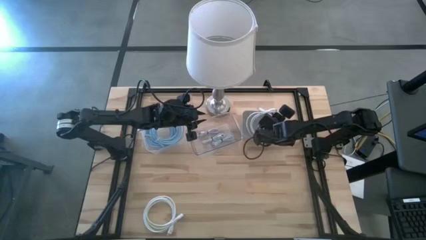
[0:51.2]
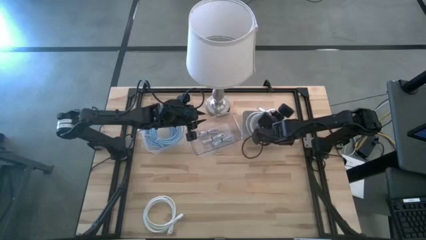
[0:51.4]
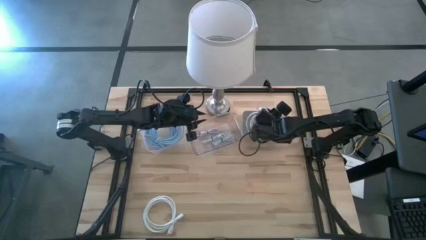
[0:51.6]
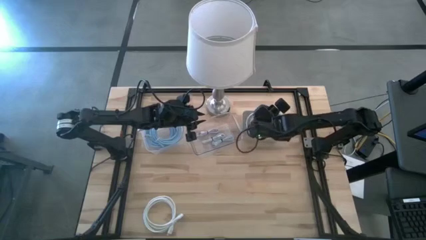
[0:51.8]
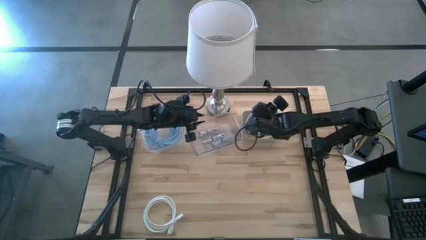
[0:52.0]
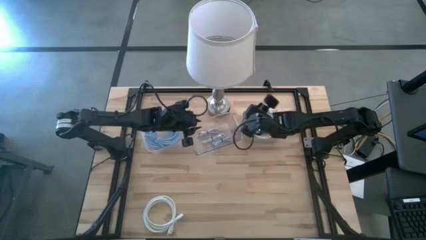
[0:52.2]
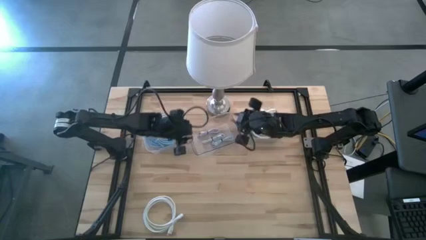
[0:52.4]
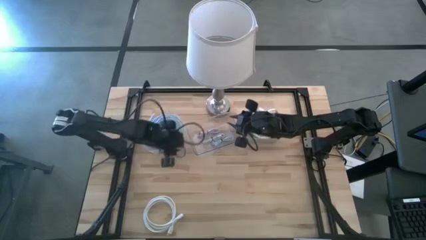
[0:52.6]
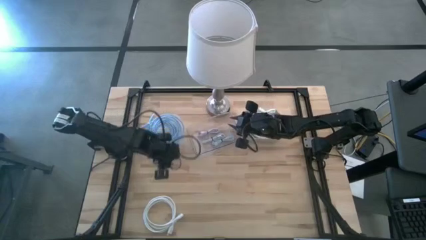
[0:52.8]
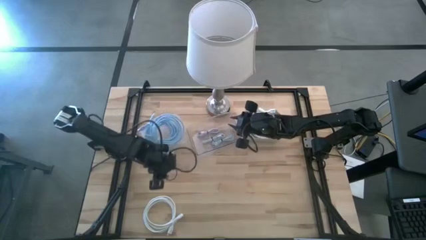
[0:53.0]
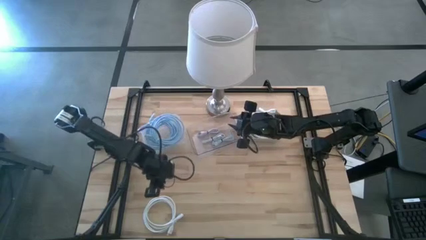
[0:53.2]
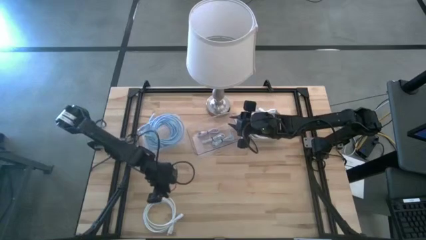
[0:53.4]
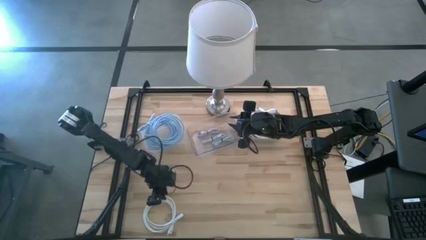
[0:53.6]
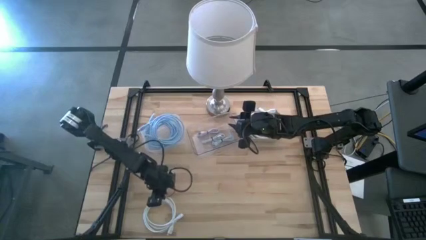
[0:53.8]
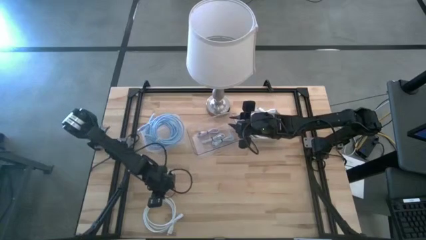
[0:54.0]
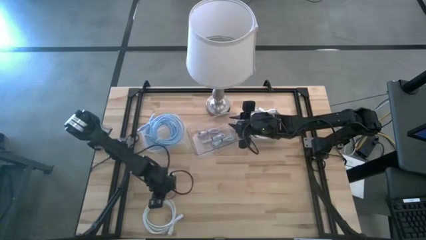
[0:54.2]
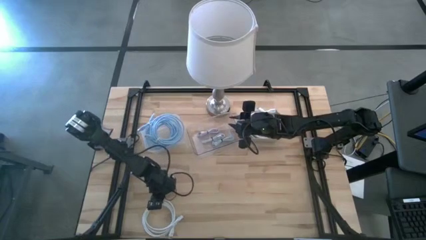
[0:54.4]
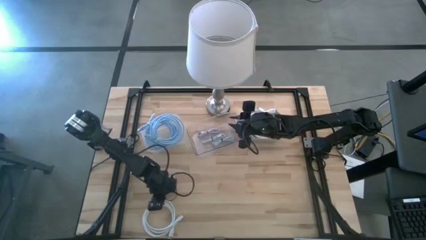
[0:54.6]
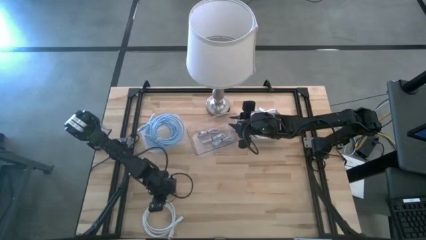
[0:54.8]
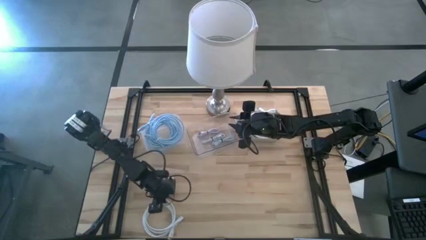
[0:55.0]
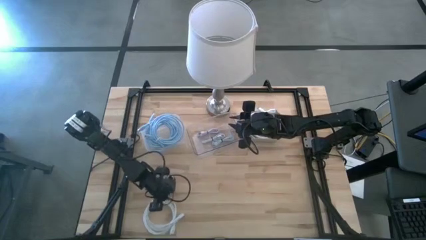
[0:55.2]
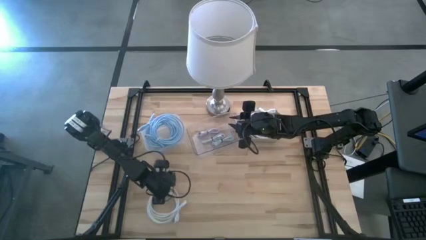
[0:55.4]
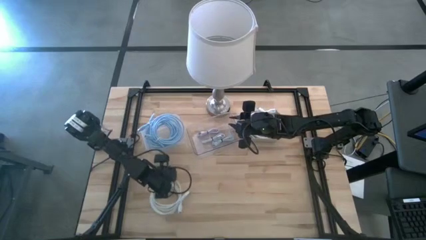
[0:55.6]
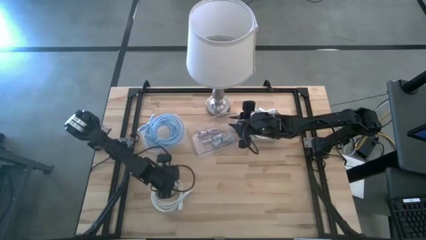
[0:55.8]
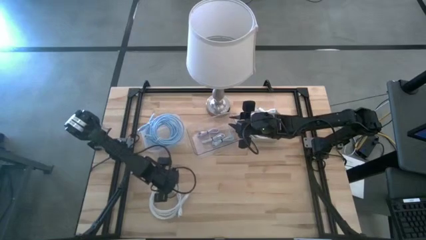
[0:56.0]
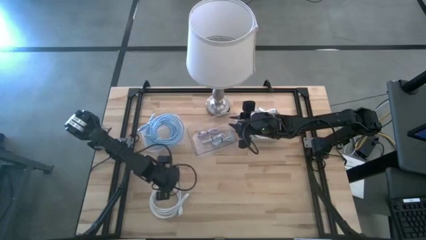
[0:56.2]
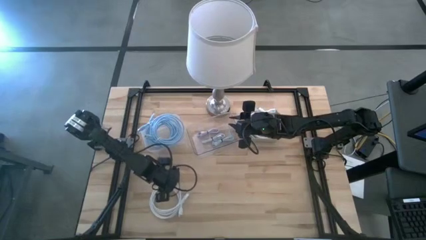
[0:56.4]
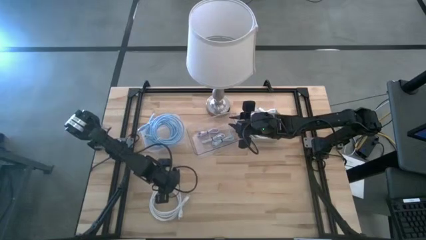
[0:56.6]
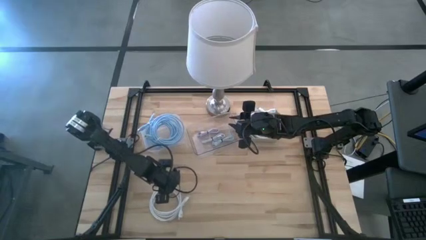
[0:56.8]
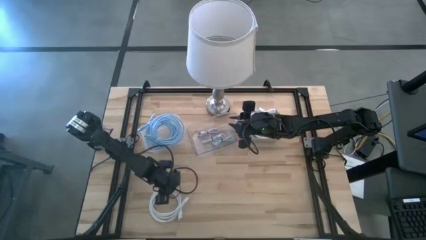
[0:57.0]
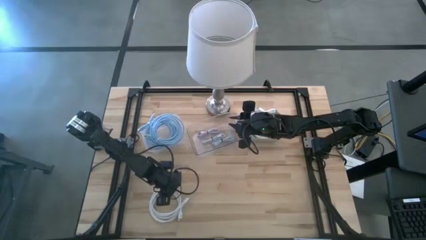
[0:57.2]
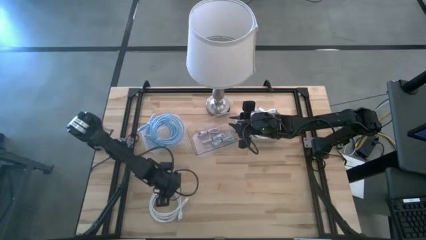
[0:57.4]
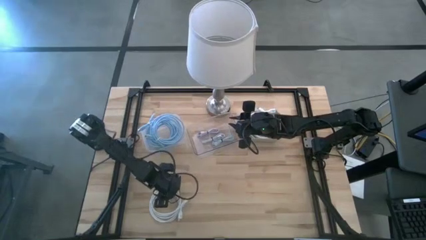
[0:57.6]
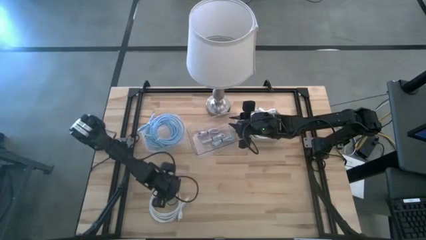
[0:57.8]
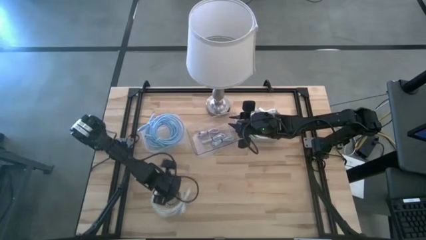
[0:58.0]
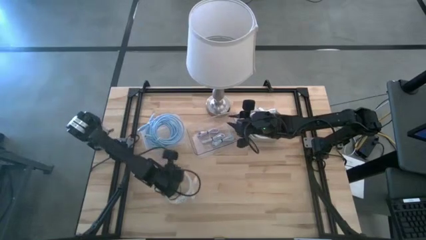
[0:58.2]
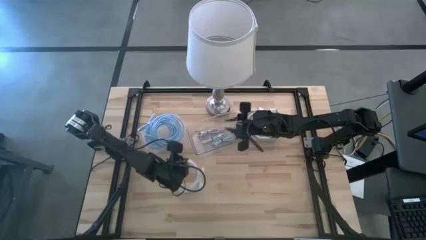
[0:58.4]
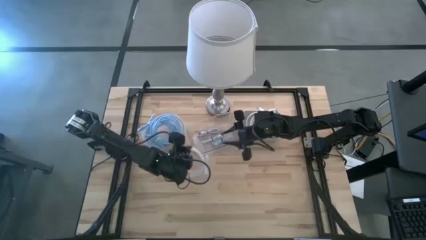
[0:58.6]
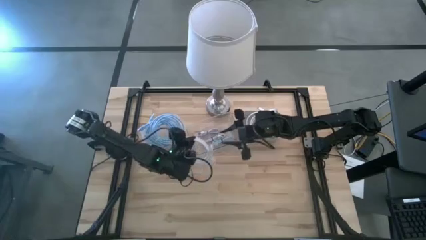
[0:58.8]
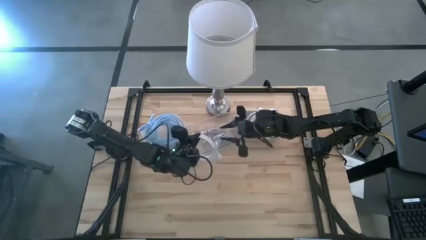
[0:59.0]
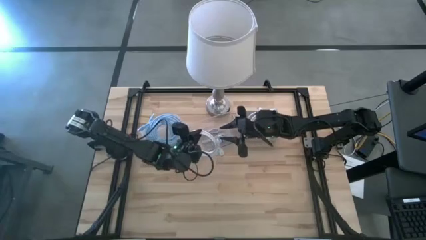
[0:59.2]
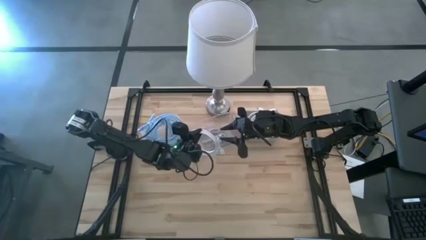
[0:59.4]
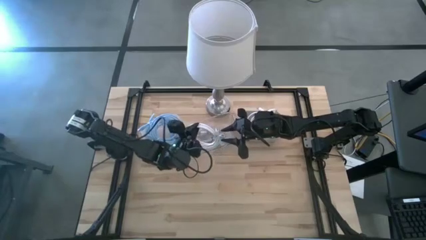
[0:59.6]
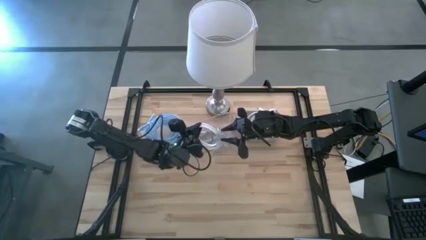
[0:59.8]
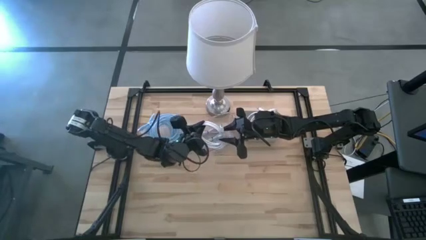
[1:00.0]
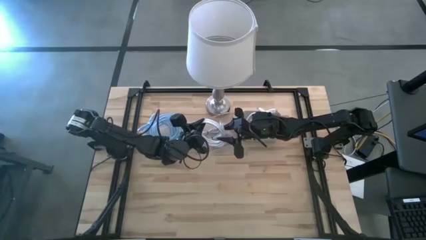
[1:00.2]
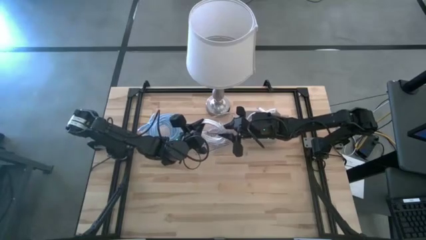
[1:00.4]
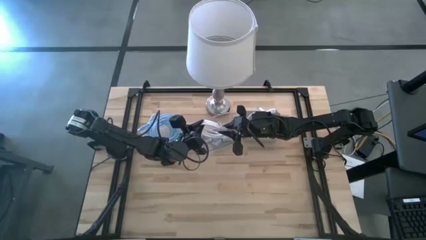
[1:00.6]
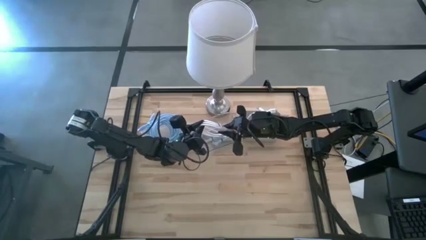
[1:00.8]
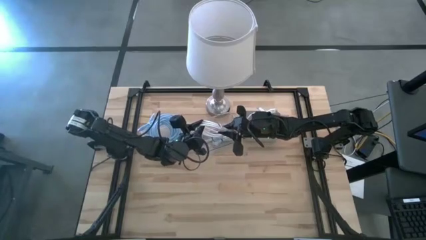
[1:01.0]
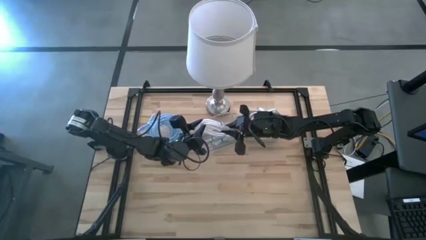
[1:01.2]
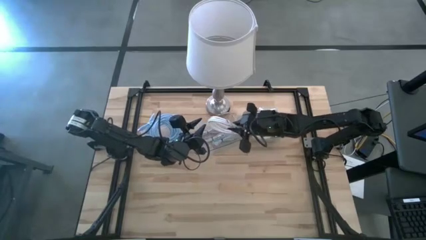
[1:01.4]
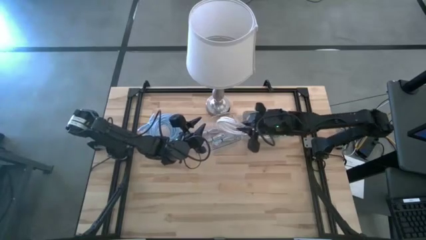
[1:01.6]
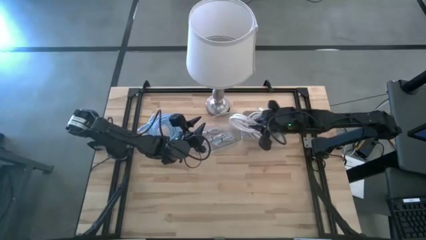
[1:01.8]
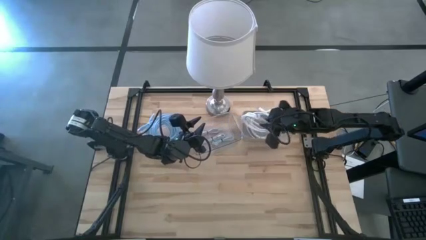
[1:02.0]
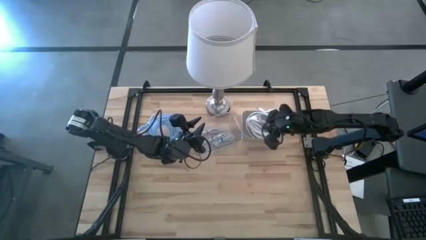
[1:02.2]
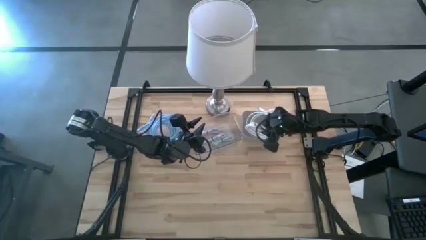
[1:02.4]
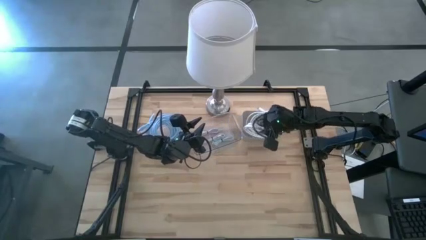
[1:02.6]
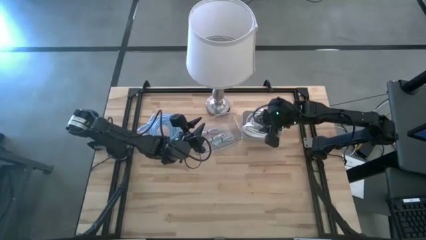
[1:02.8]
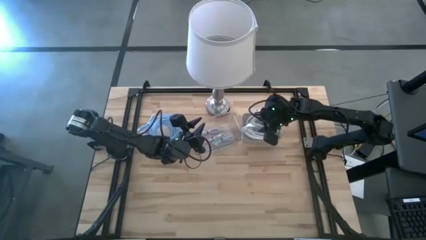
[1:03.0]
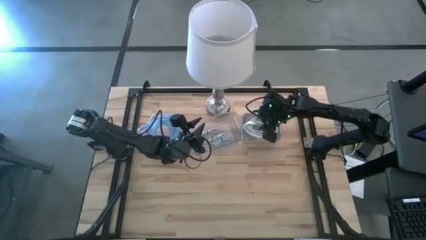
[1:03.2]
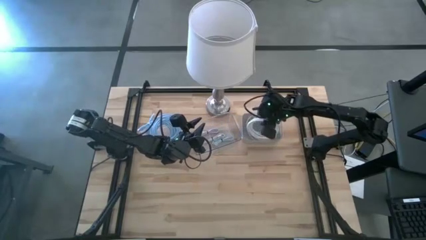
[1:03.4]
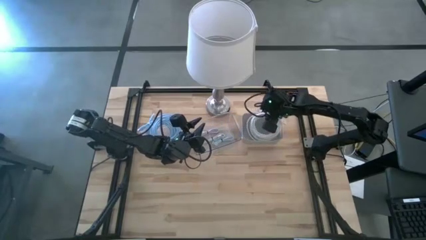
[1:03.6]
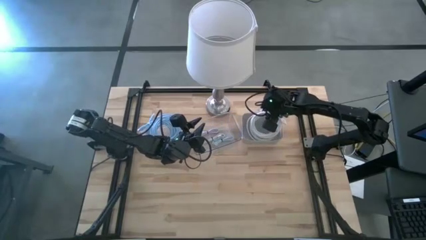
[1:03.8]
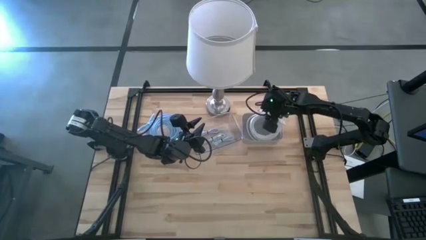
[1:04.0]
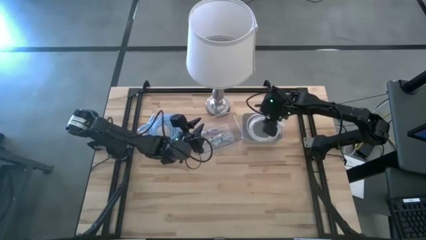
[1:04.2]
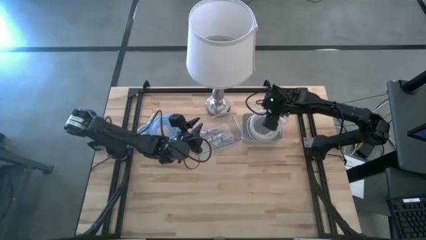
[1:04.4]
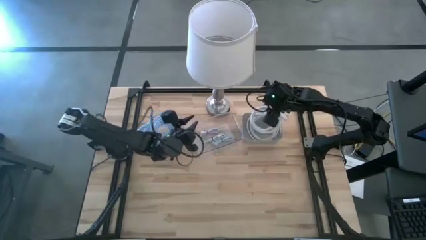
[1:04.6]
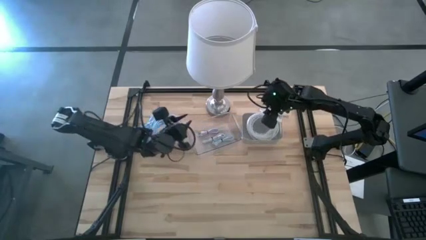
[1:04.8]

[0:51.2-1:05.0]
Task: Pick & Place USB Port
Put the white hdmi cable into the gray bin

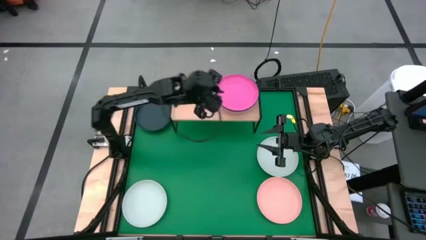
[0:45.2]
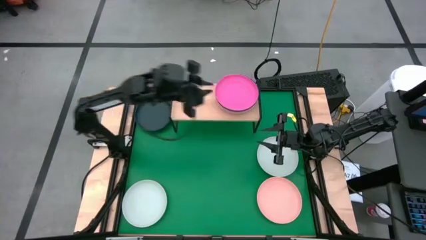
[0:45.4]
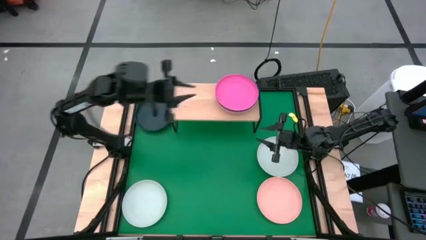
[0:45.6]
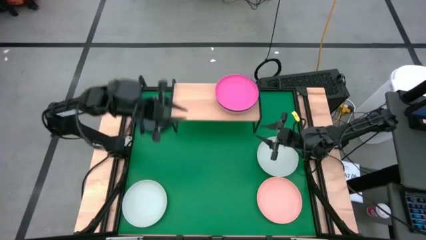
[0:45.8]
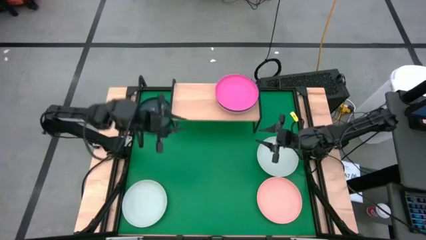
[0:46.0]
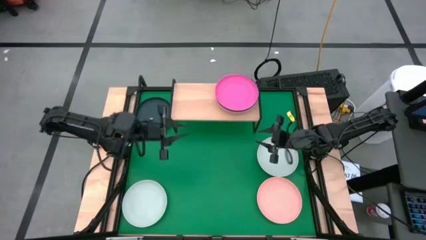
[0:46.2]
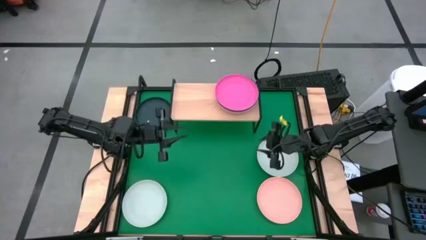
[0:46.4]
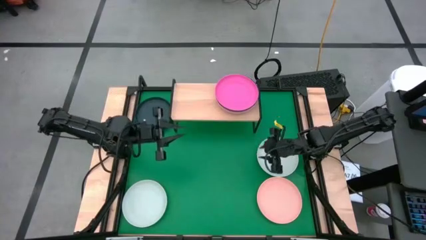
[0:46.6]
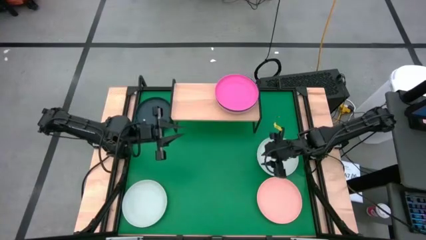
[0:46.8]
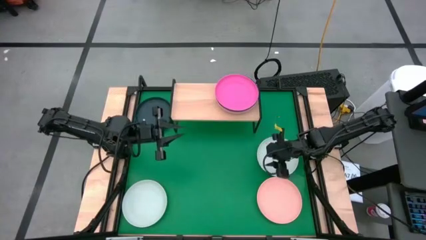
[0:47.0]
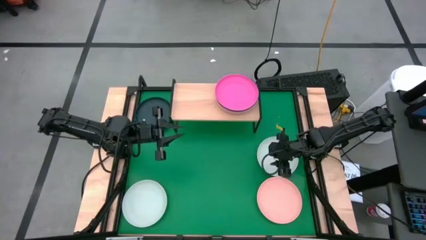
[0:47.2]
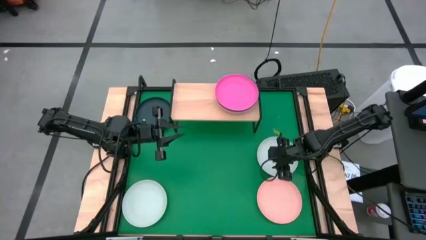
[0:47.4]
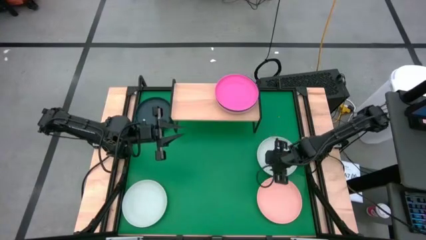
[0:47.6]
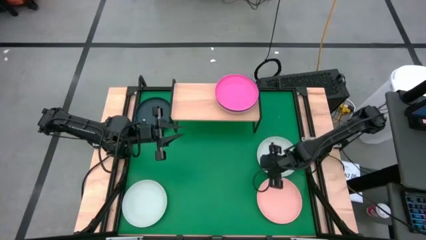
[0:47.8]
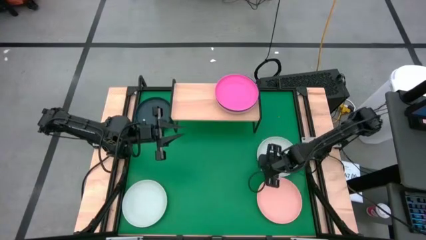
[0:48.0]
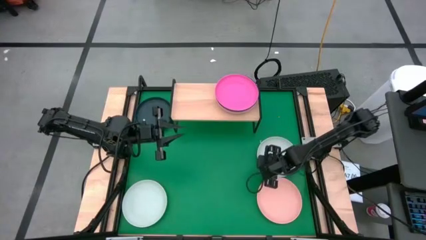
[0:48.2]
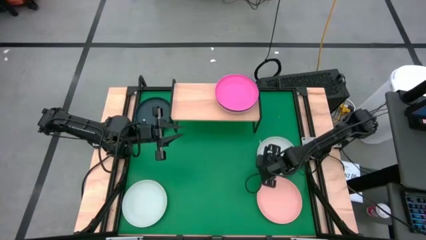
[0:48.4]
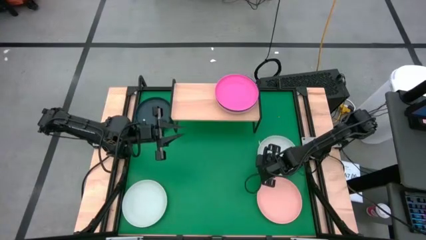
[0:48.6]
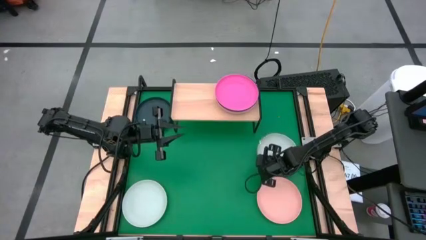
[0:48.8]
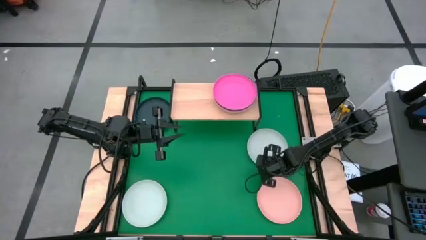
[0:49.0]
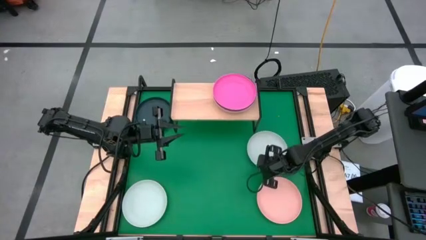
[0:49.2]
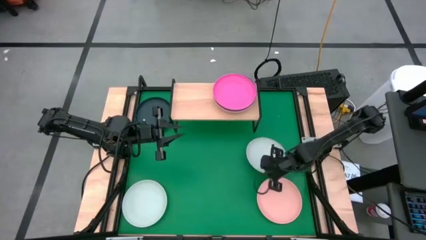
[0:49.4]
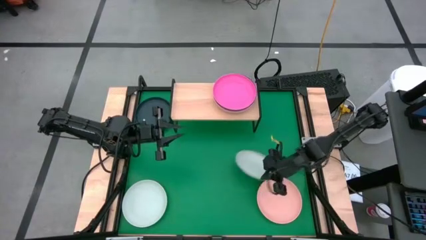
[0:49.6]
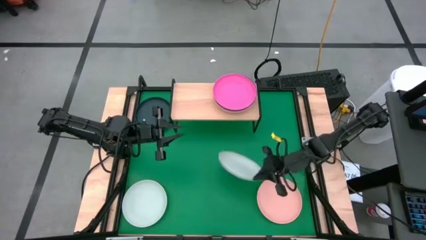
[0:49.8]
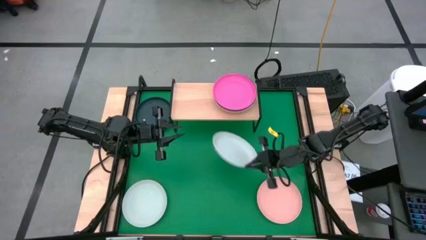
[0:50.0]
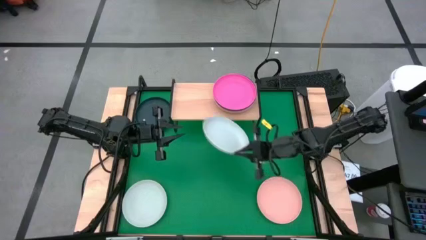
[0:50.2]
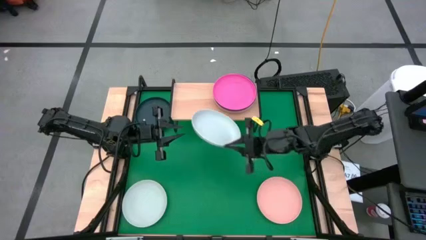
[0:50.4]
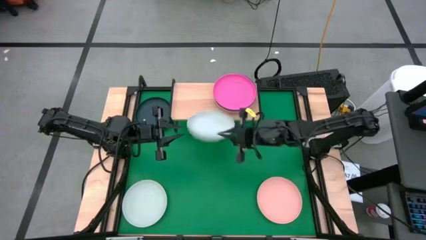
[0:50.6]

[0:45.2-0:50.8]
Task: Place and stack plates onto a shelf
Put the right white plate on the shelf
